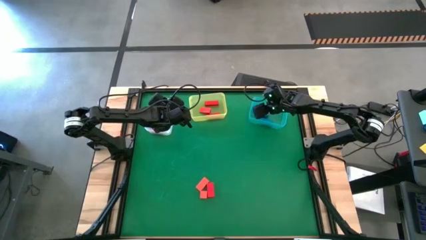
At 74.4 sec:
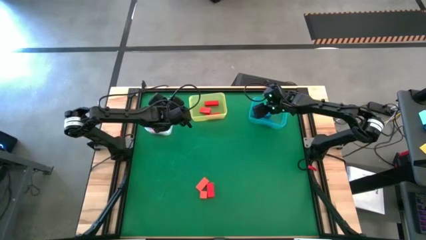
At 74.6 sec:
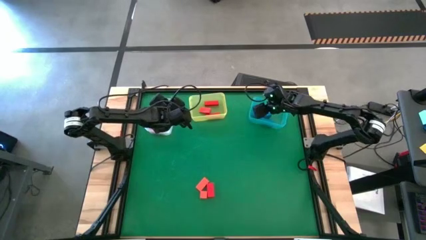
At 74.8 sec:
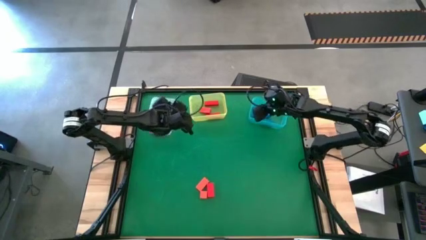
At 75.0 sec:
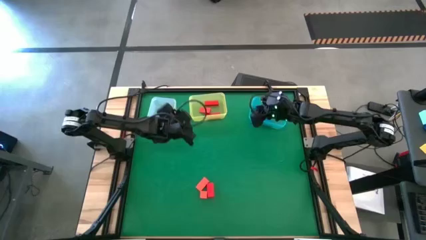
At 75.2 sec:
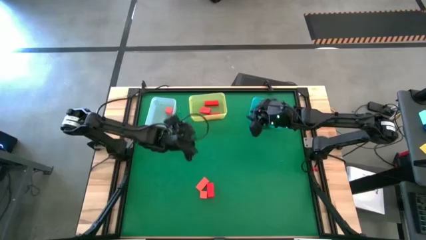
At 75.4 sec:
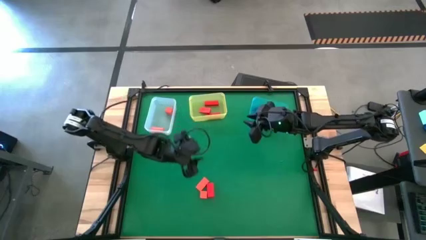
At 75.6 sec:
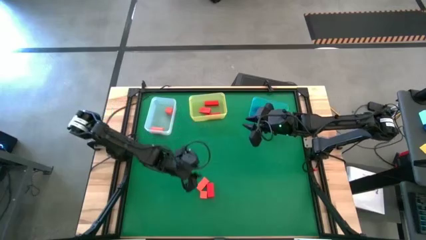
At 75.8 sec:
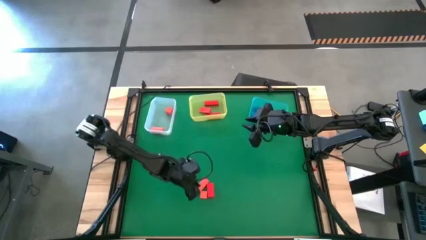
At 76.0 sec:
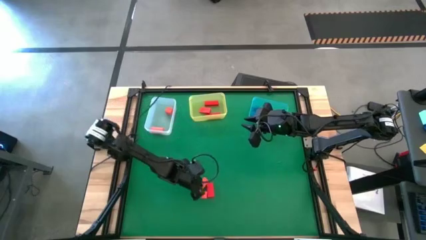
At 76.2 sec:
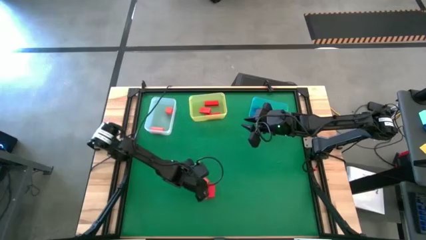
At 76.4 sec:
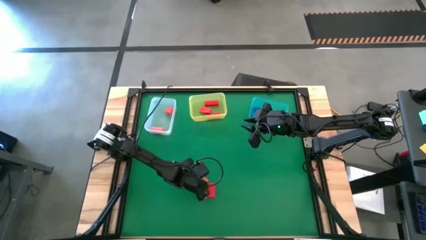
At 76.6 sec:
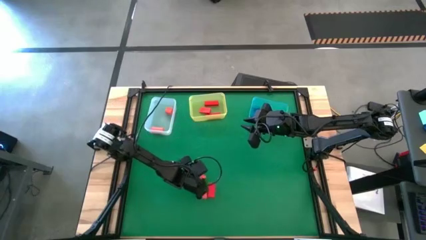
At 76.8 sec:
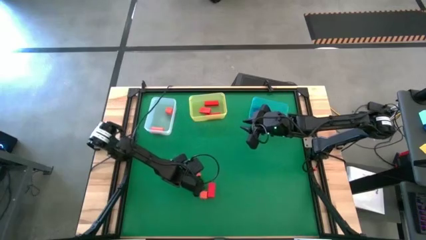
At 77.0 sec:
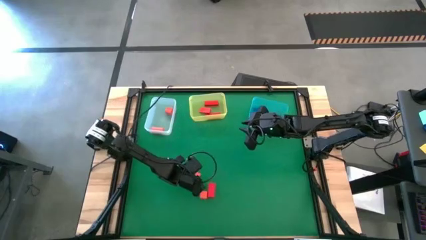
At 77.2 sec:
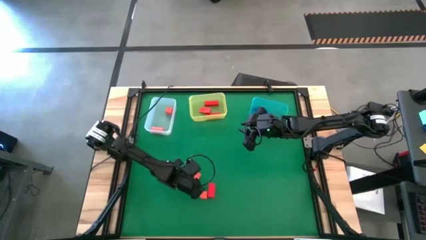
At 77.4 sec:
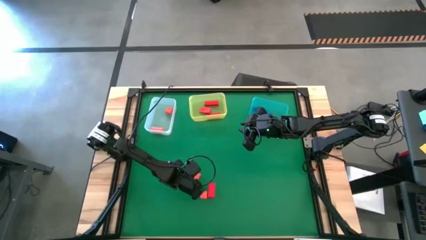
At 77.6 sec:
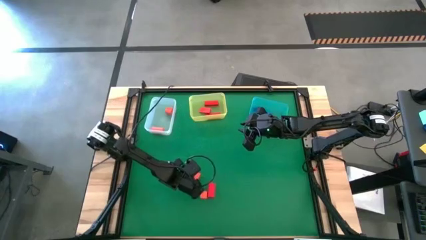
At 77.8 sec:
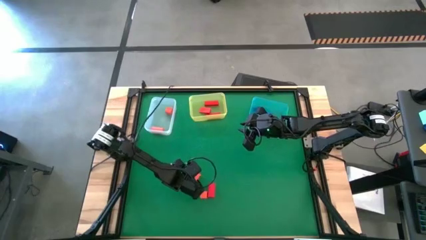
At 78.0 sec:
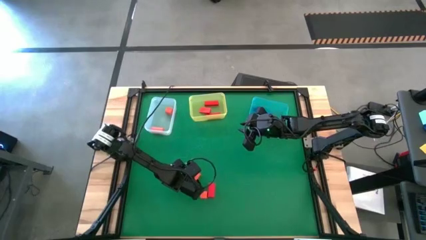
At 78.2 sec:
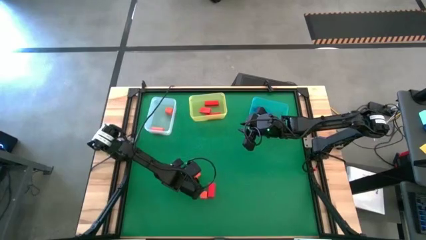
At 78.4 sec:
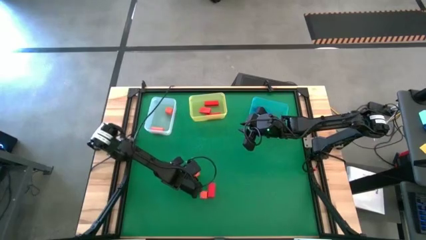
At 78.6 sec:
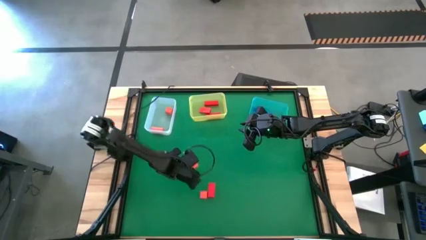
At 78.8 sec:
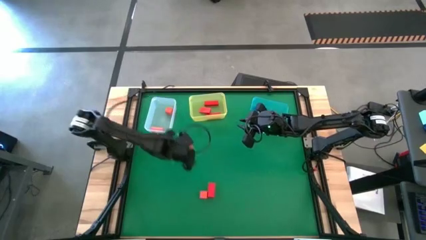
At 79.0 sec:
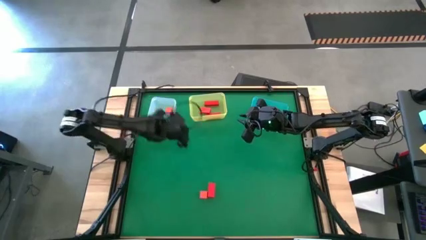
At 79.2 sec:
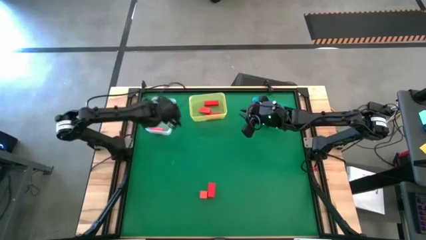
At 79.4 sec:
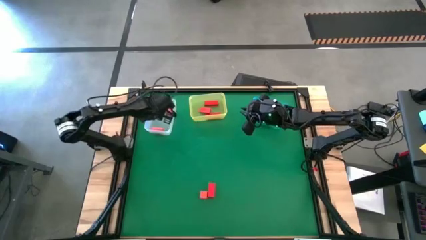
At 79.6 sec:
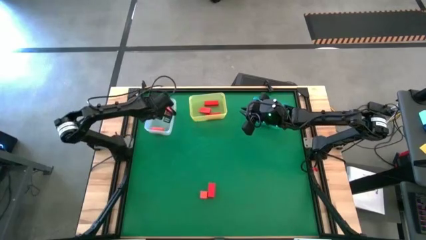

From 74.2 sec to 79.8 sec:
Task: Sort & place blocks by color
Put the orange block into the transparent bin

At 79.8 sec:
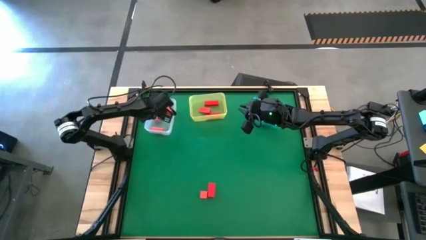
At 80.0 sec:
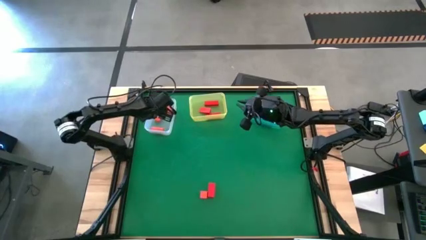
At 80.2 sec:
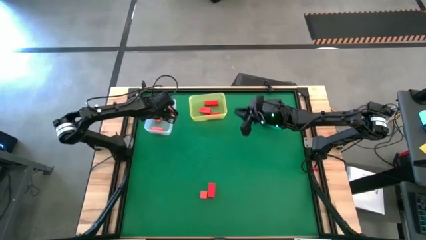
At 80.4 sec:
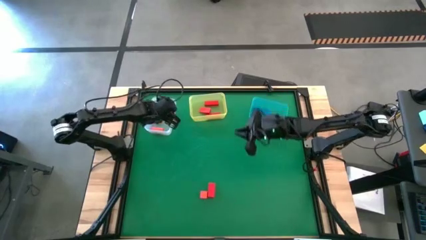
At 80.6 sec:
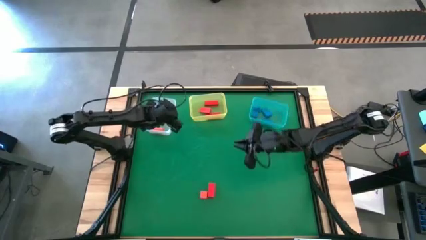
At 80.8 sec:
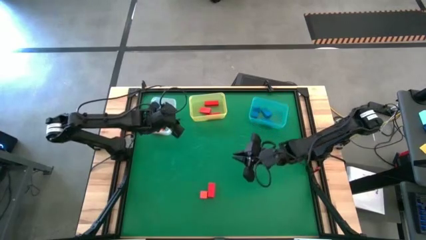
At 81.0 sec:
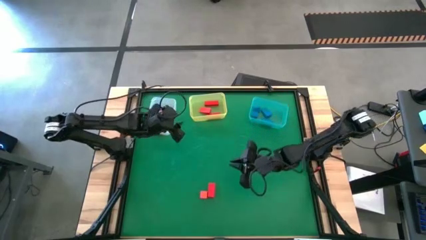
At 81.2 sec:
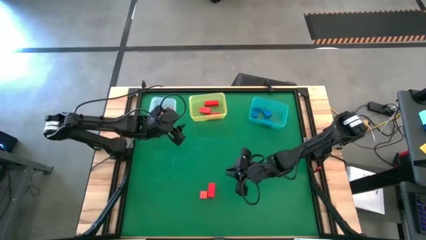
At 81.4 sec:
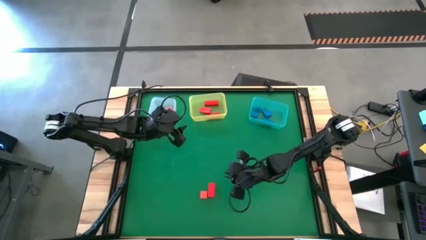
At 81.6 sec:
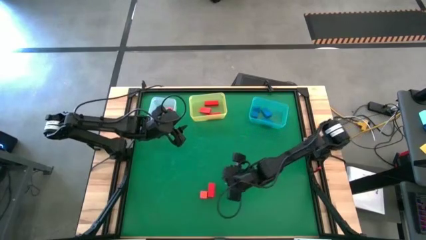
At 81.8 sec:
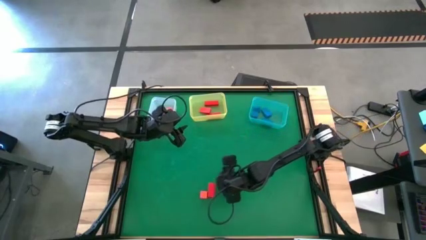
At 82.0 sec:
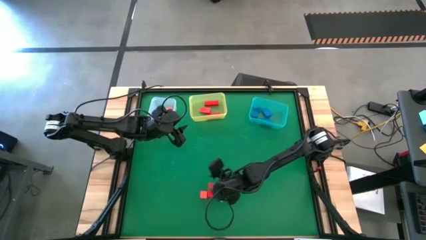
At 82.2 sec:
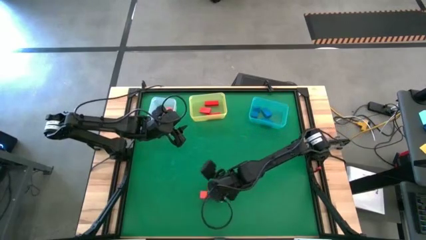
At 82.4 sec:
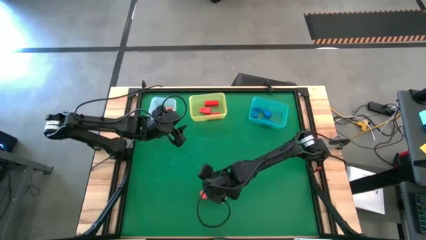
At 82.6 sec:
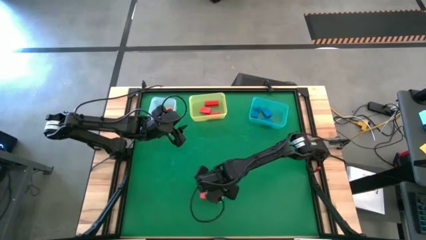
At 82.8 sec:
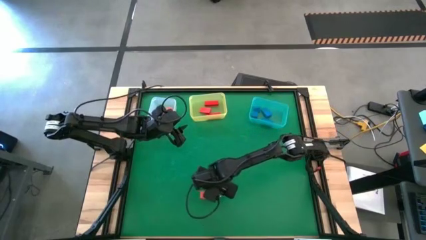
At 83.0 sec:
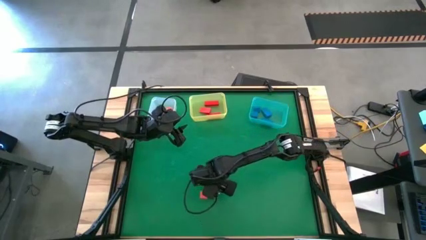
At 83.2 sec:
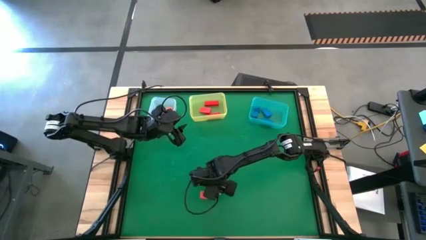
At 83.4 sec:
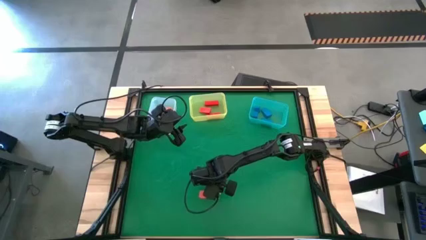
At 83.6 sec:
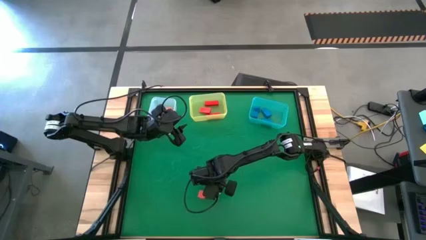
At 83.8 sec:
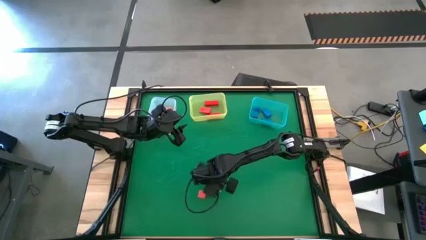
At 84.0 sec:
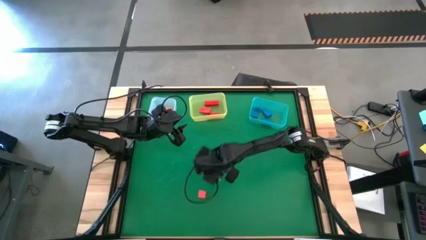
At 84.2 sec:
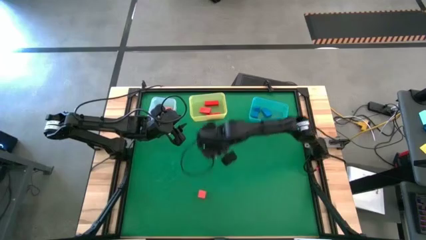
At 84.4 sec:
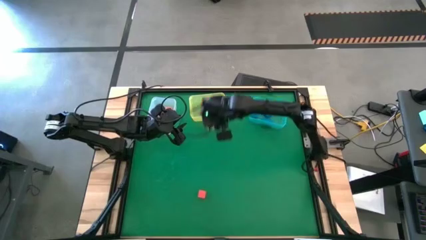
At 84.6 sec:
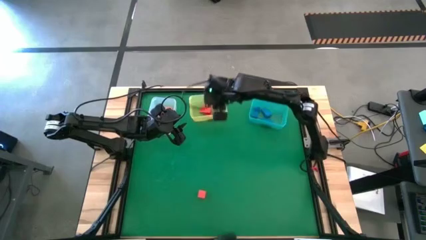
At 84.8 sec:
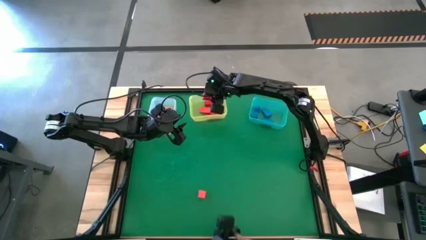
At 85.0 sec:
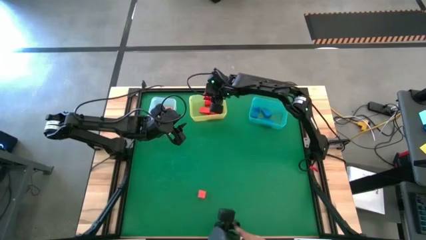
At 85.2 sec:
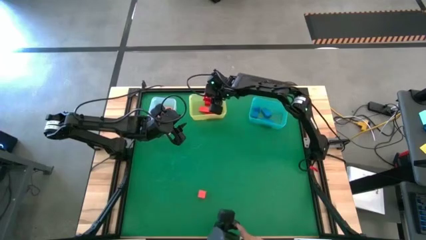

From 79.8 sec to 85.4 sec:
Put the red block into the yellow bin

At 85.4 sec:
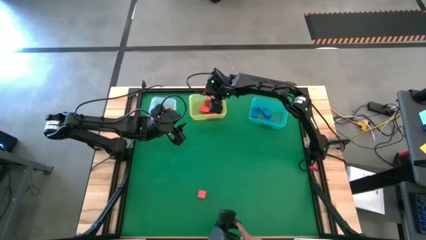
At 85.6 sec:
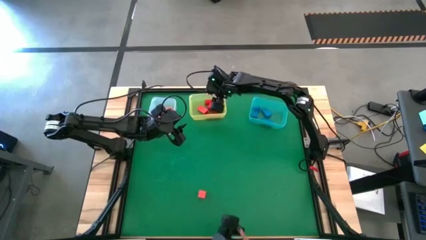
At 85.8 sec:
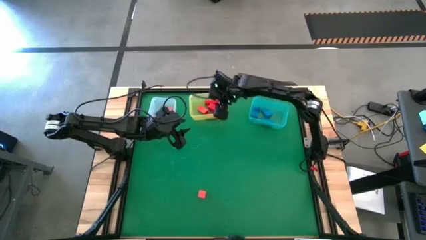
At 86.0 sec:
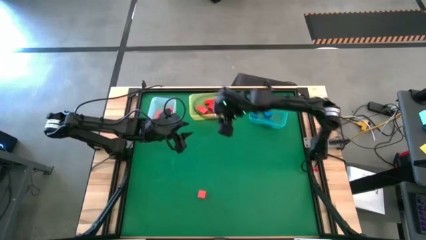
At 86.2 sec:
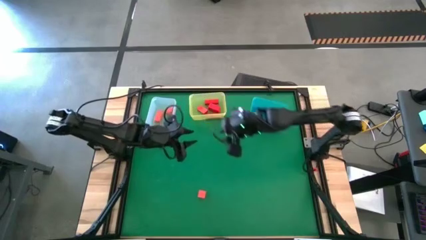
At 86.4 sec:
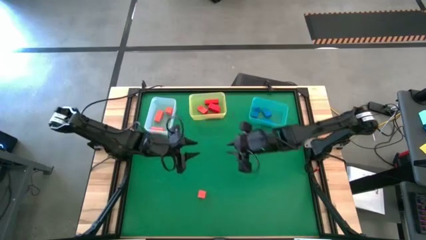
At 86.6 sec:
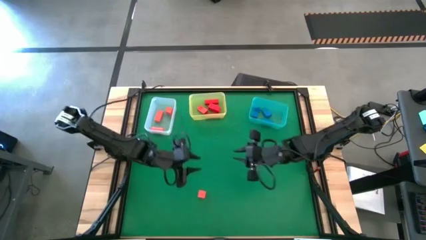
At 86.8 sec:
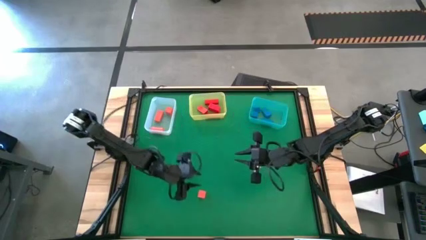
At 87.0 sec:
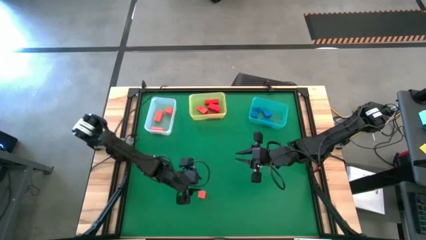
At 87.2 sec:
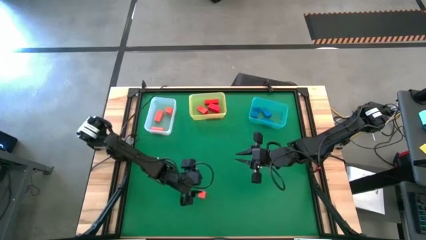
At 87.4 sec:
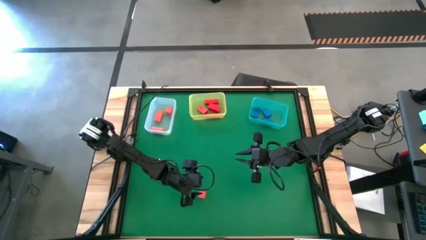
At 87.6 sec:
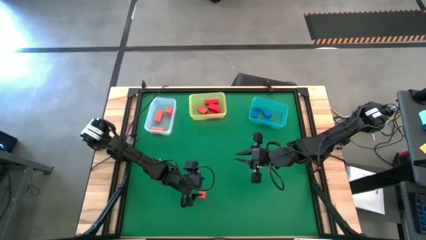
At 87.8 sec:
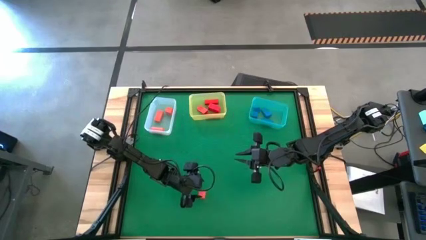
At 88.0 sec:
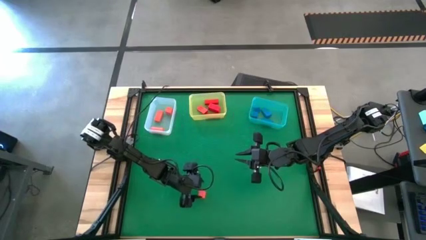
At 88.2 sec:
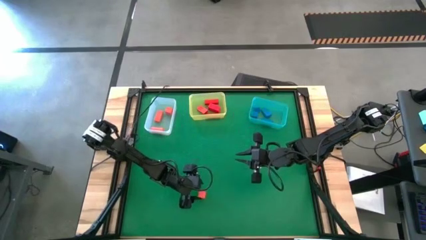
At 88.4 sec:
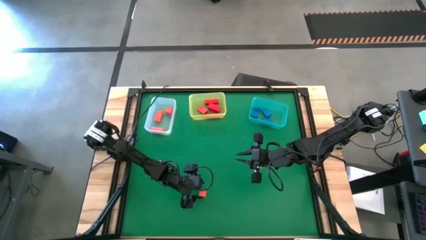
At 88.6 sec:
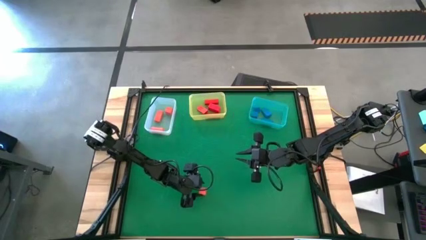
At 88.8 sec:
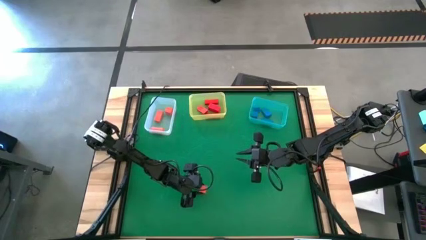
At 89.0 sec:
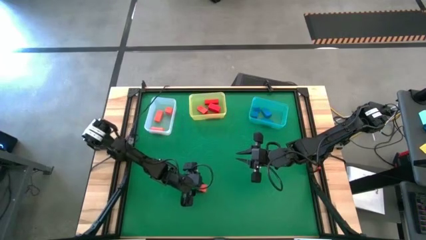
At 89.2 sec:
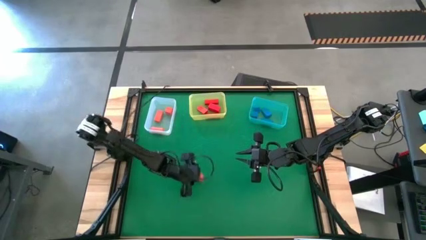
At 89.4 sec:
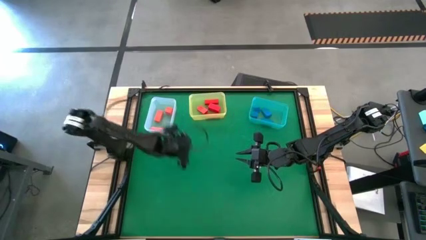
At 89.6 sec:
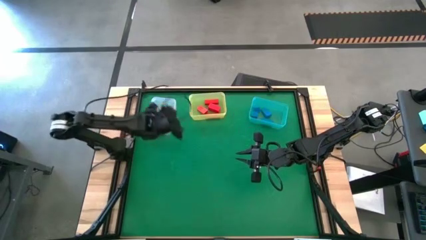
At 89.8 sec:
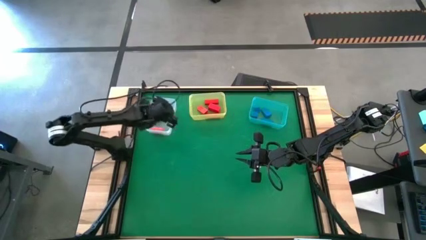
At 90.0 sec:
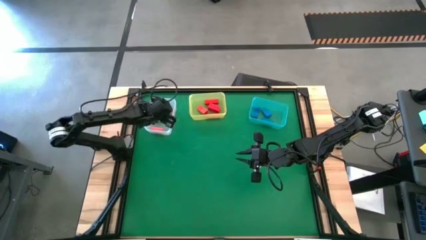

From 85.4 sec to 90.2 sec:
Put the orange block into the transparent bin
